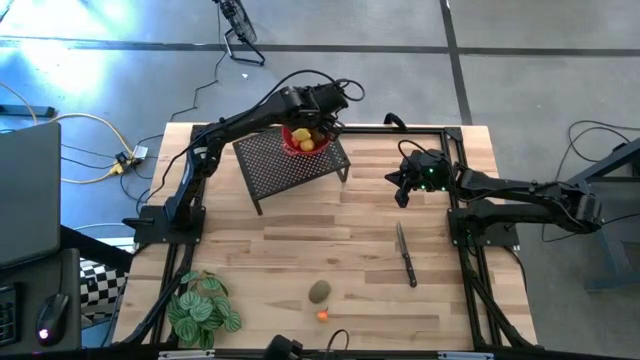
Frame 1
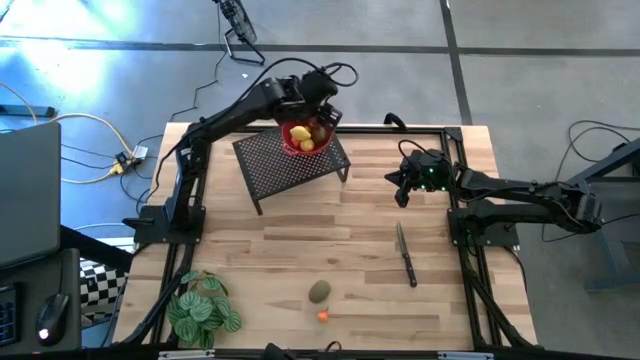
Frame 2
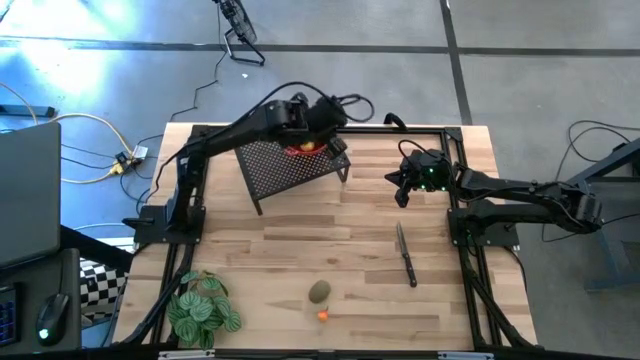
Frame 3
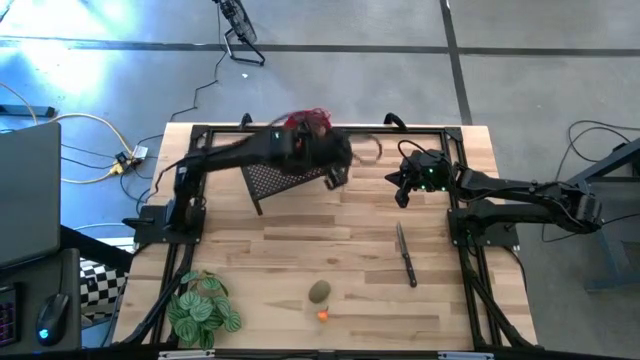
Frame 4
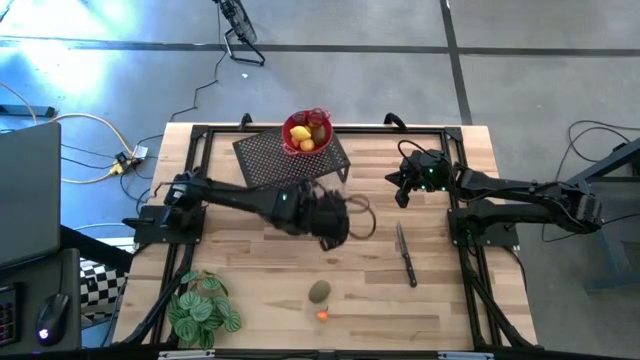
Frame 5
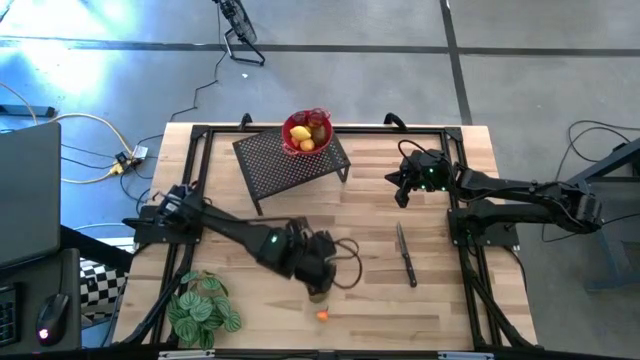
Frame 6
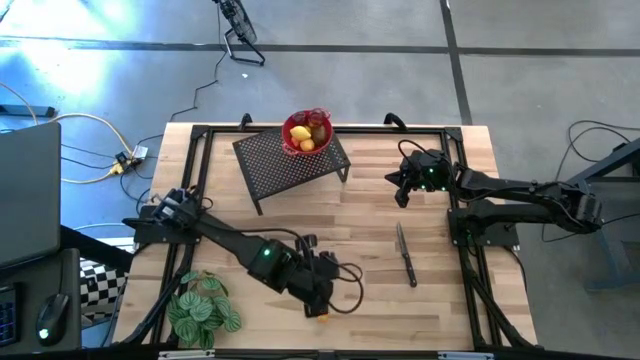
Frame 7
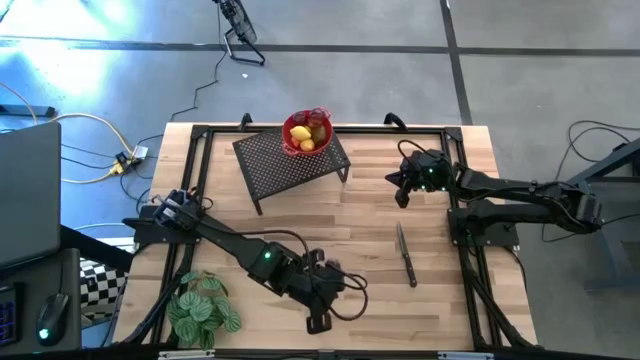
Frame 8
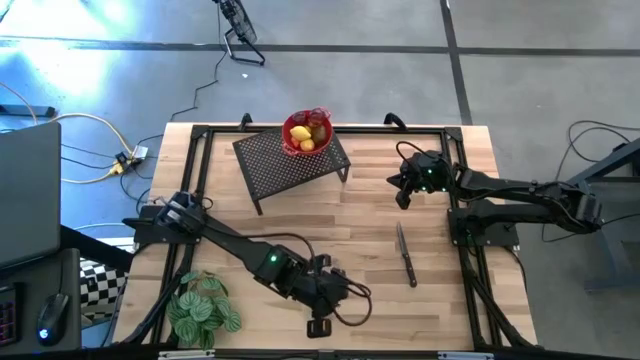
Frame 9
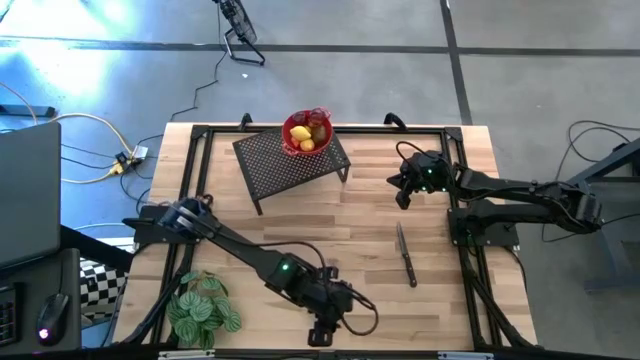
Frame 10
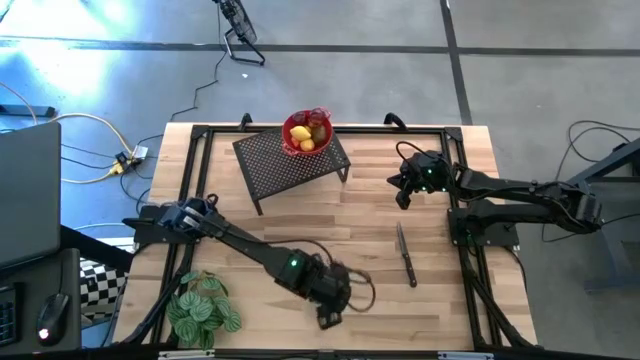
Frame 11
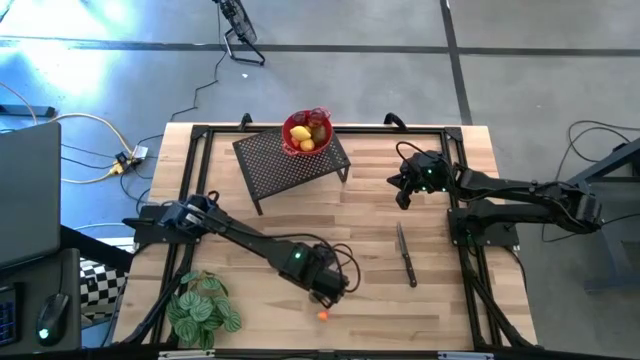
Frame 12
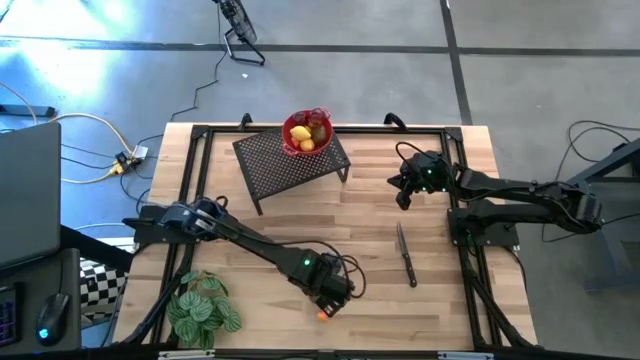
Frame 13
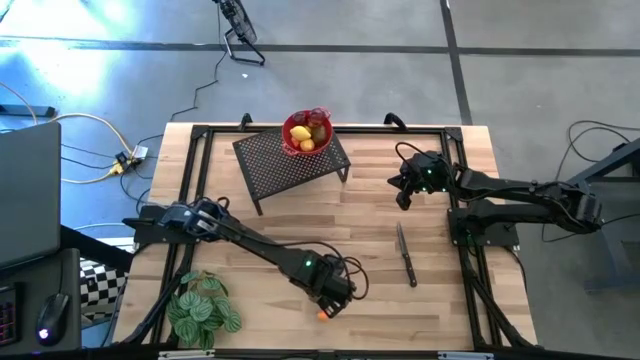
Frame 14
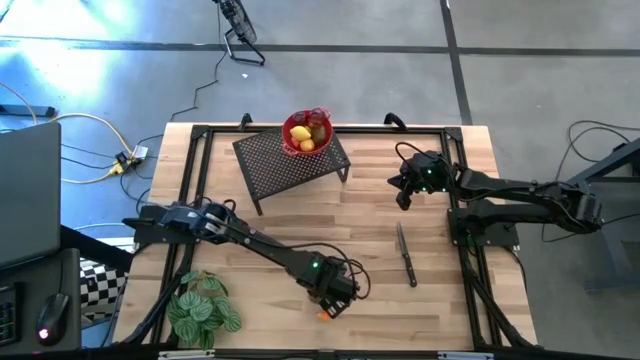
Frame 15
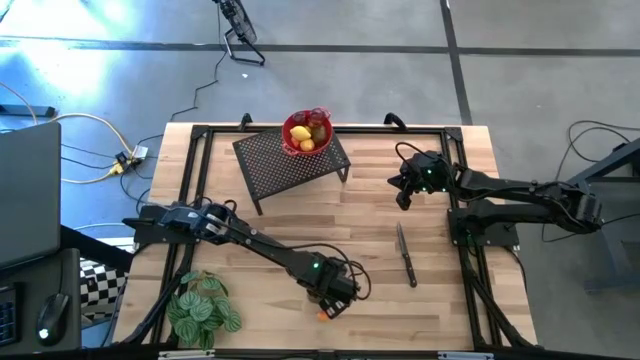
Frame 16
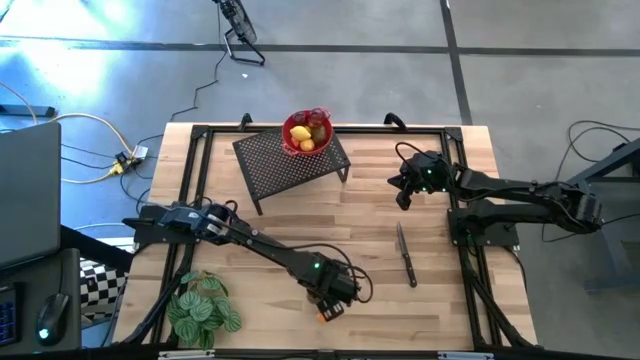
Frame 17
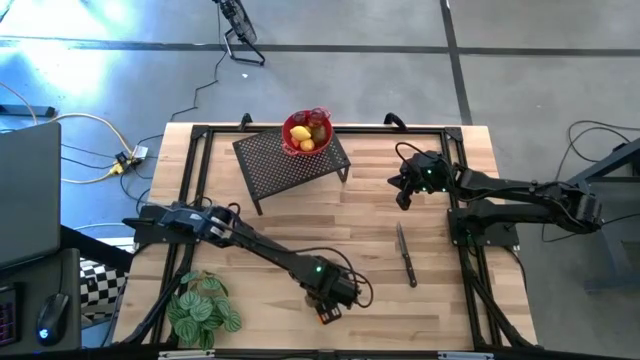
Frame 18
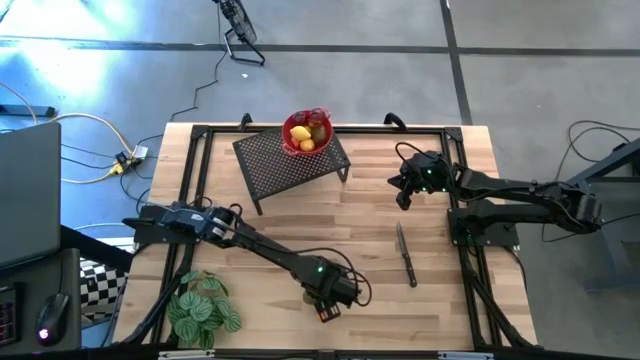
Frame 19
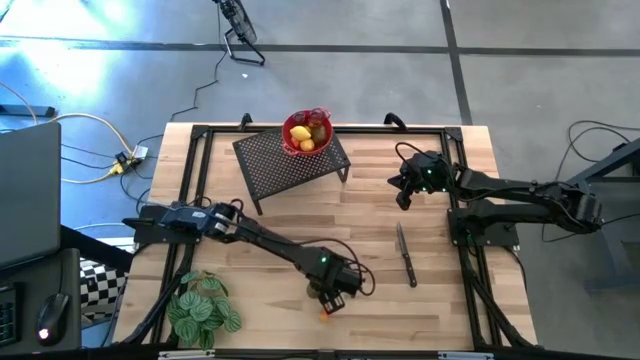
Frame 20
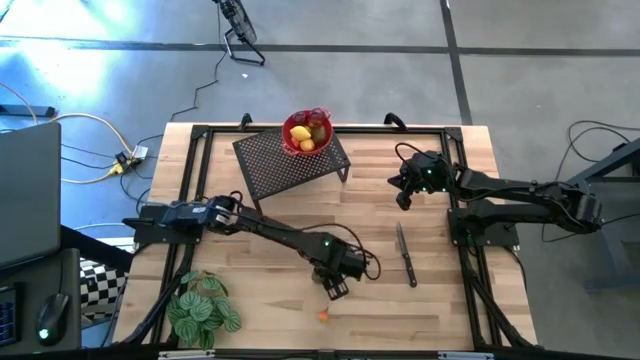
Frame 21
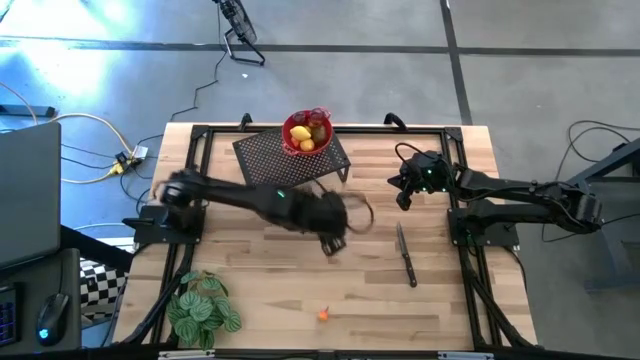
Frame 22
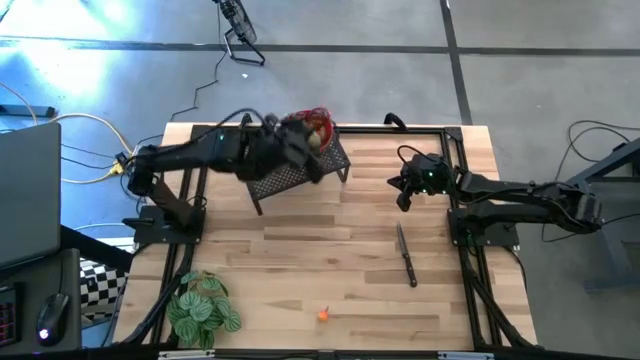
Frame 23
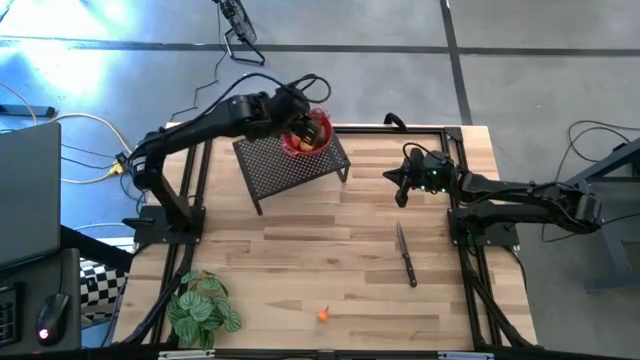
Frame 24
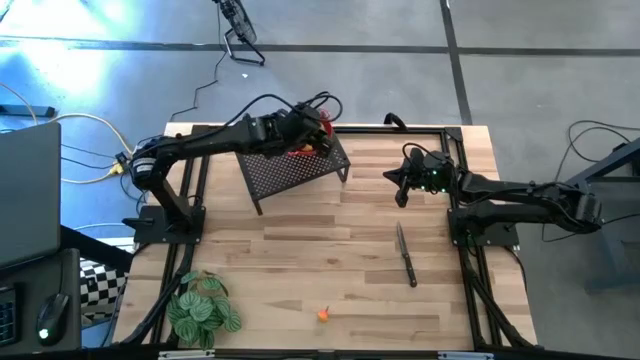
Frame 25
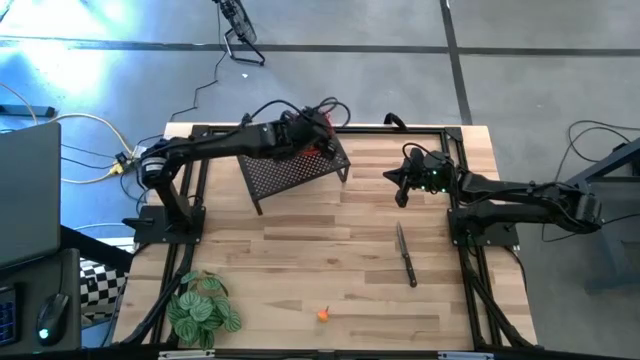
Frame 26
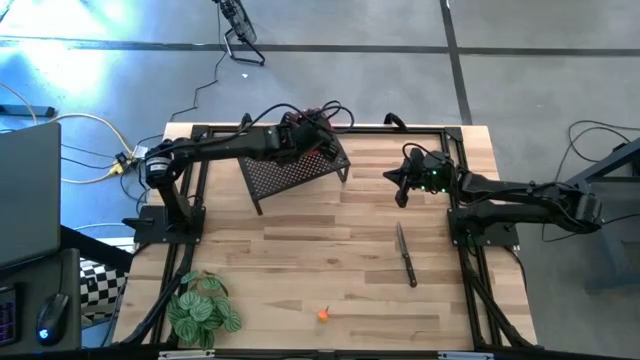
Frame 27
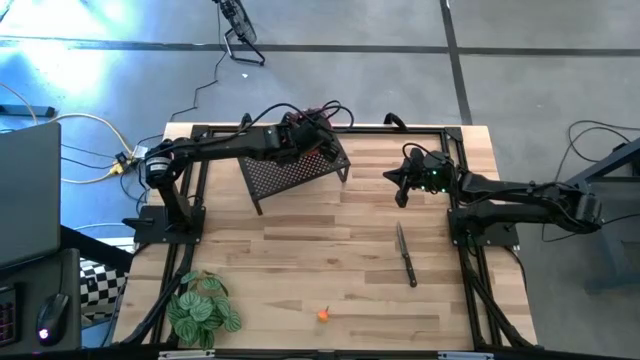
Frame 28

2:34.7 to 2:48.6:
Task: Pick & Place Fruit
Put the kiwi into the red strainer bowl on the shelf

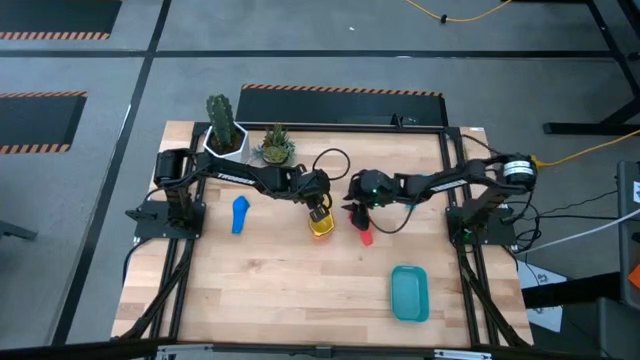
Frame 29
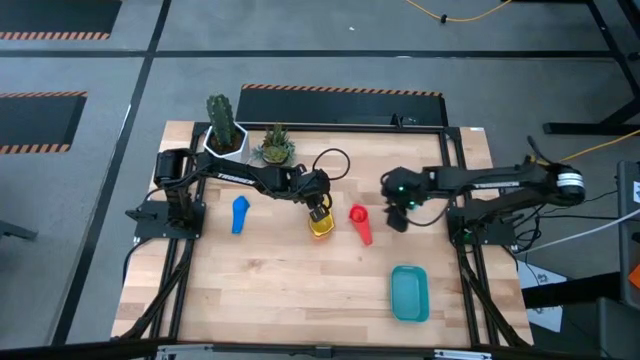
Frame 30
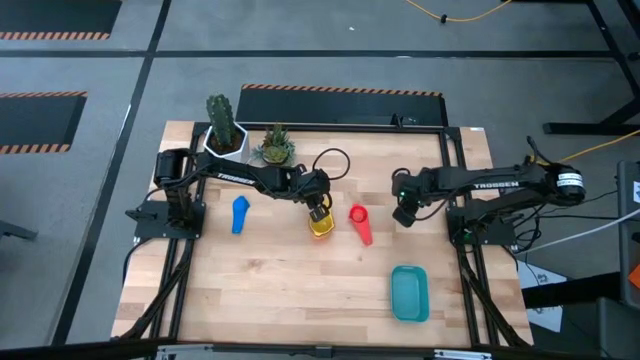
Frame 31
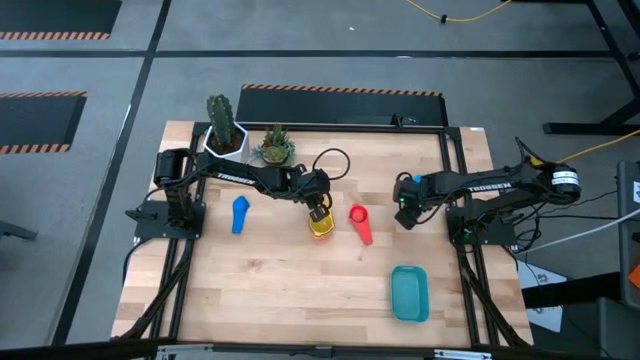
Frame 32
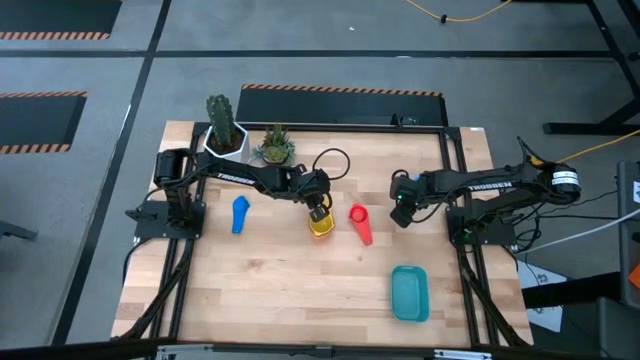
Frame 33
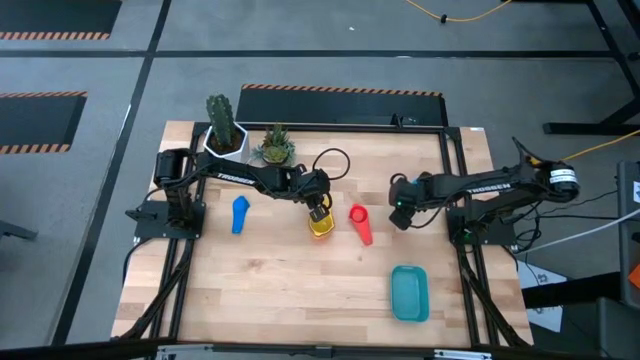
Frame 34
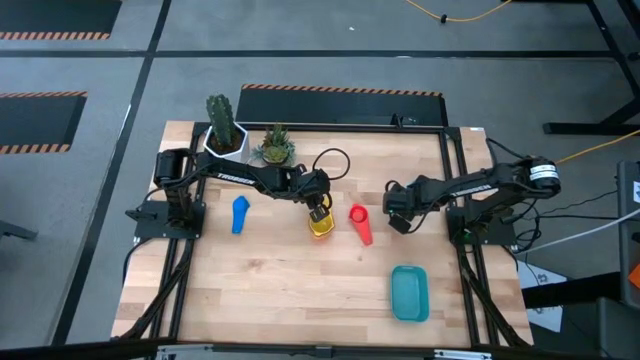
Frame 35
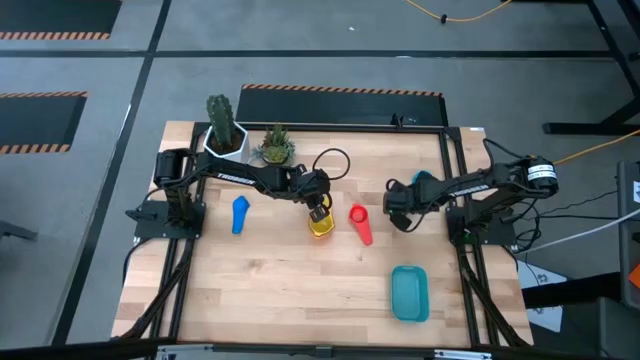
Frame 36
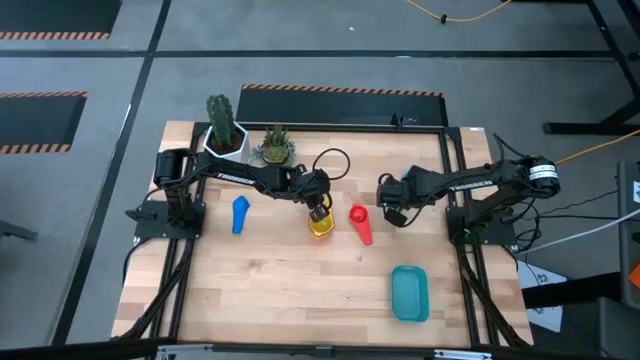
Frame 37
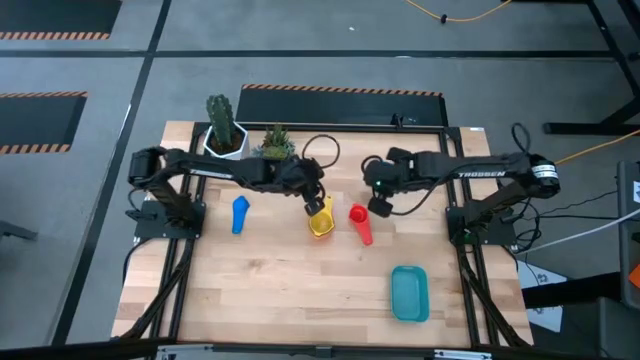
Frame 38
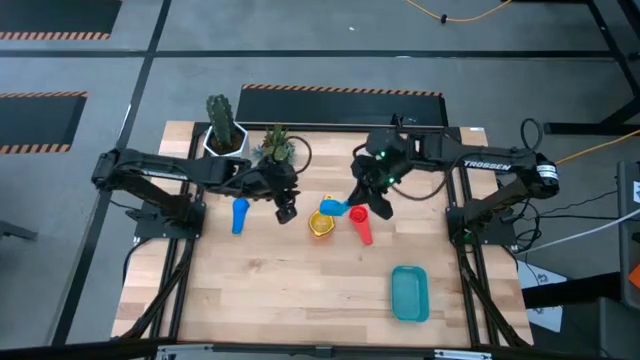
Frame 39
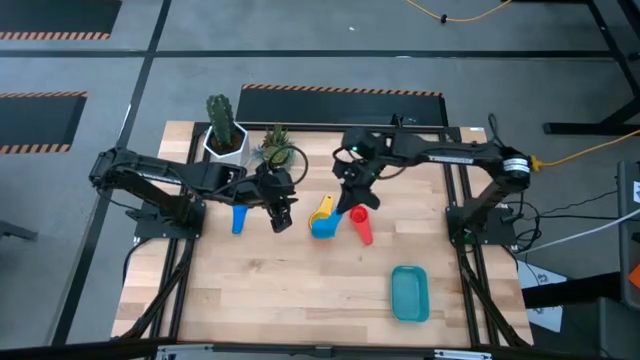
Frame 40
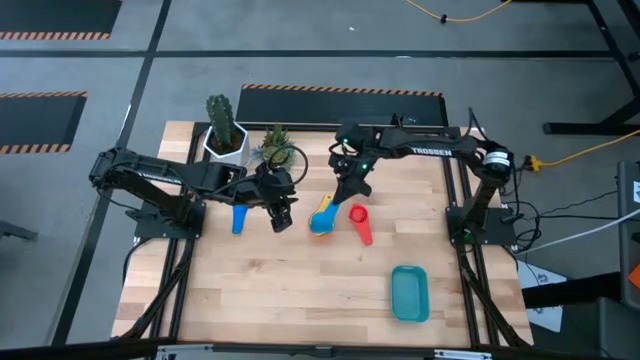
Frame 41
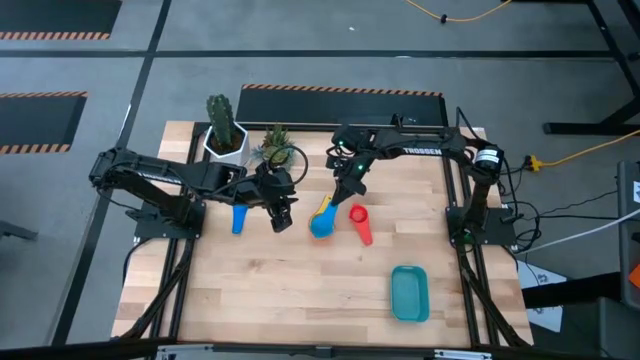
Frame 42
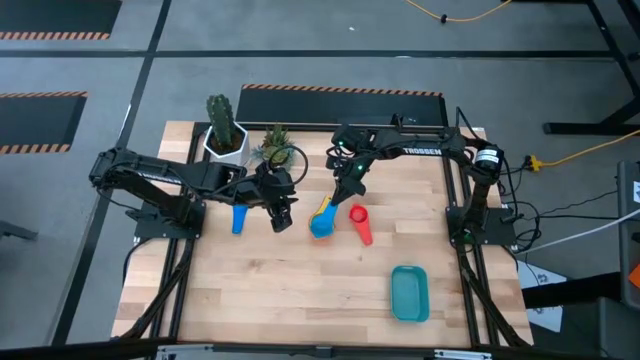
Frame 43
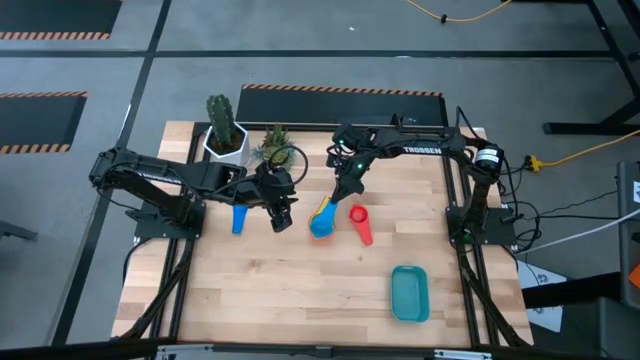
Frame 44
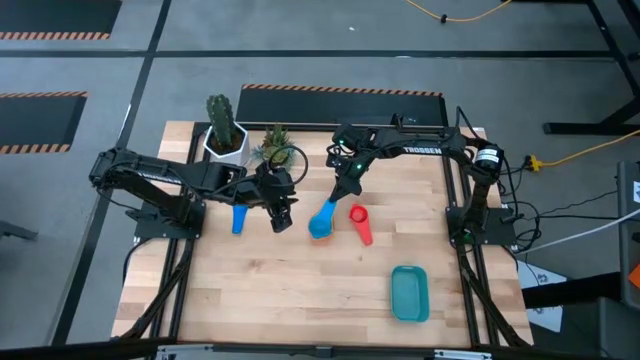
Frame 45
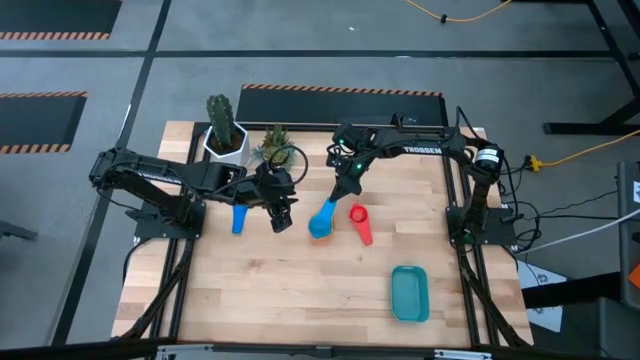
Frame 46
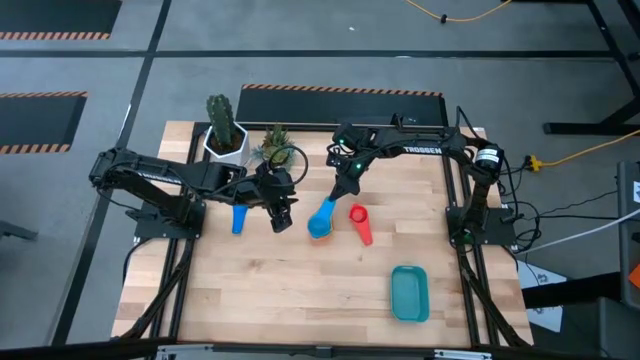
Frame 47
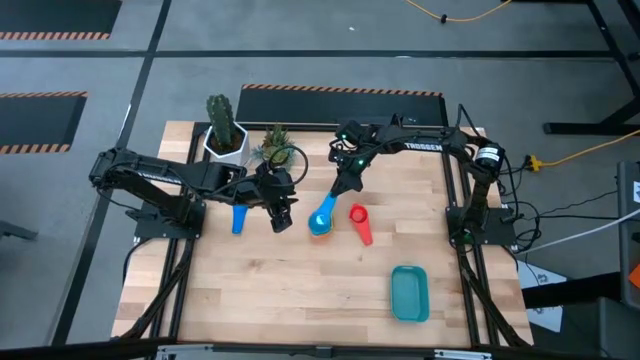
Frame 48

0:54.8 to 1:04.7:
Task: Nest measuring cups in basket
Stack the sky blue measuring cup on top of the yellow measuring cup
